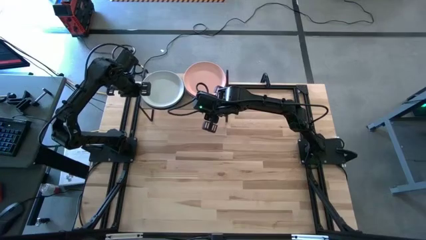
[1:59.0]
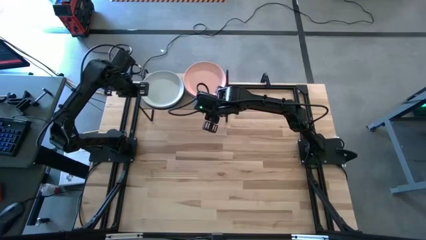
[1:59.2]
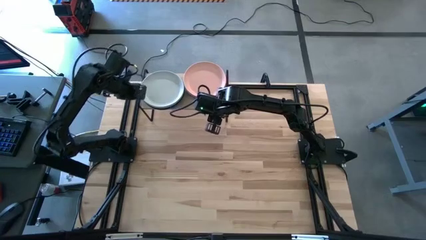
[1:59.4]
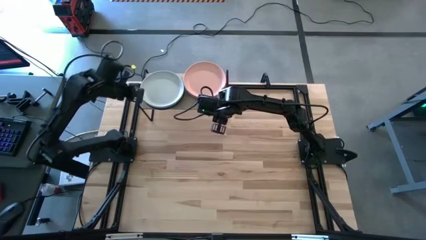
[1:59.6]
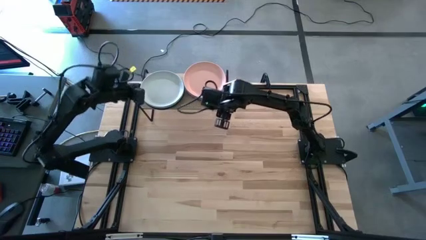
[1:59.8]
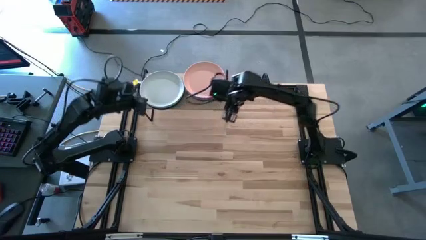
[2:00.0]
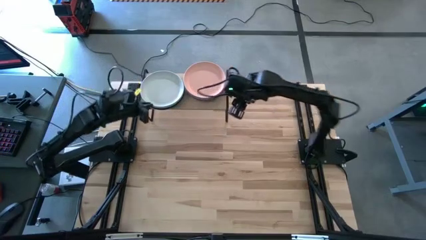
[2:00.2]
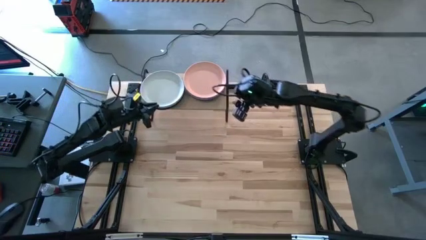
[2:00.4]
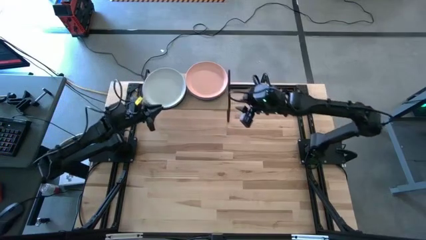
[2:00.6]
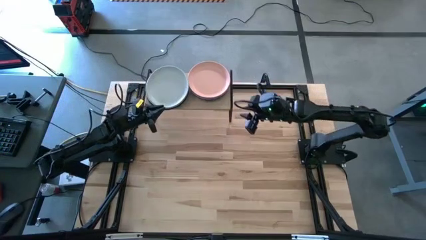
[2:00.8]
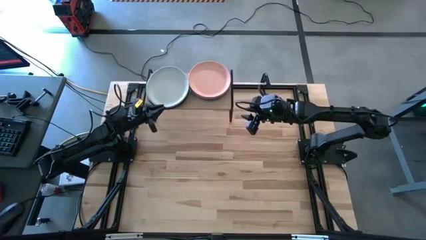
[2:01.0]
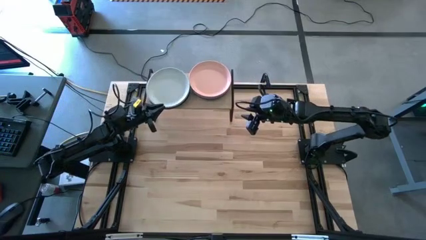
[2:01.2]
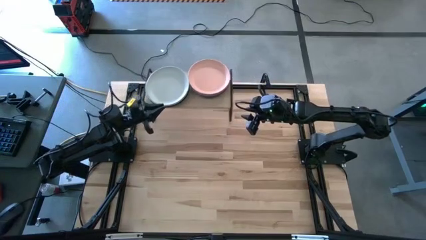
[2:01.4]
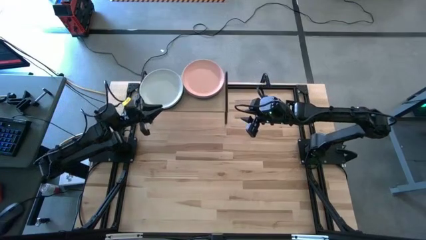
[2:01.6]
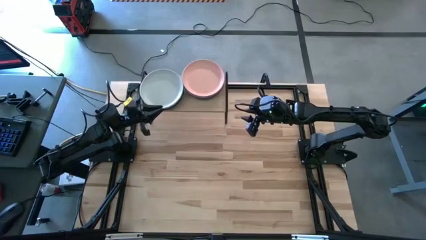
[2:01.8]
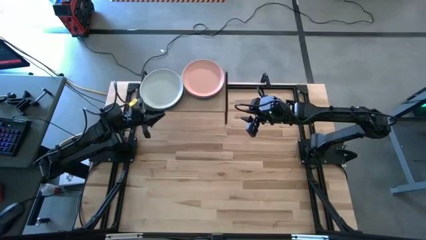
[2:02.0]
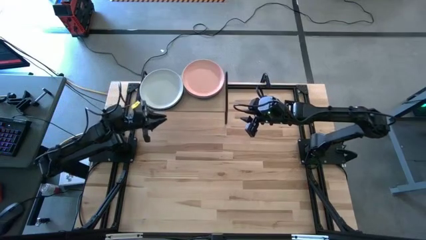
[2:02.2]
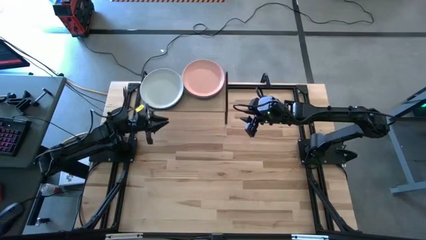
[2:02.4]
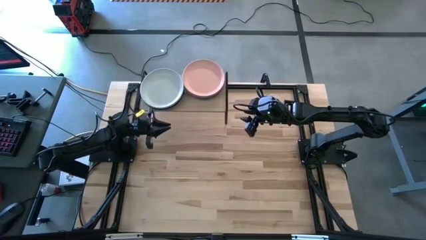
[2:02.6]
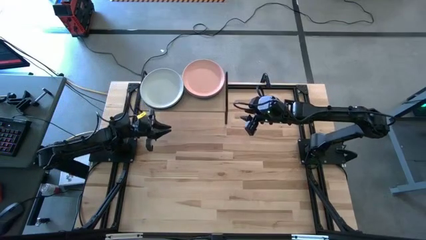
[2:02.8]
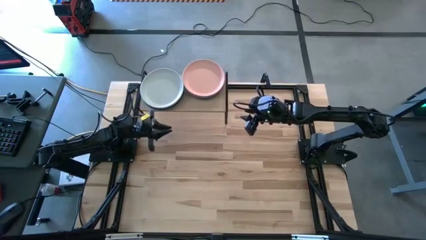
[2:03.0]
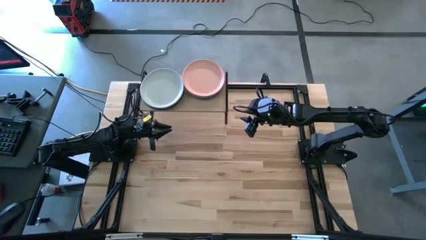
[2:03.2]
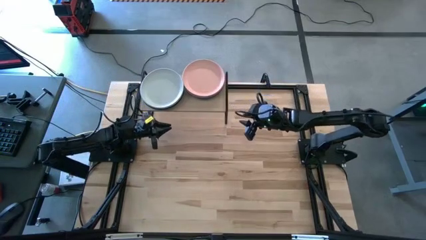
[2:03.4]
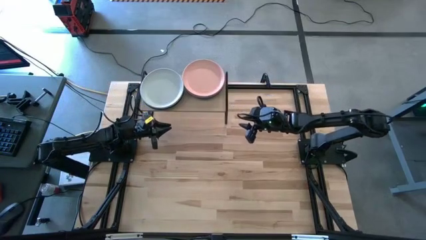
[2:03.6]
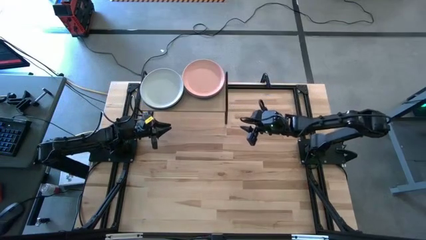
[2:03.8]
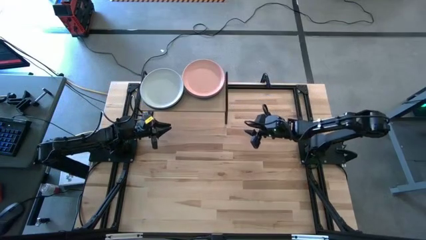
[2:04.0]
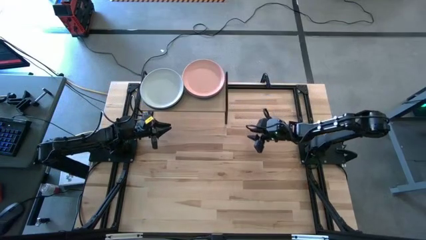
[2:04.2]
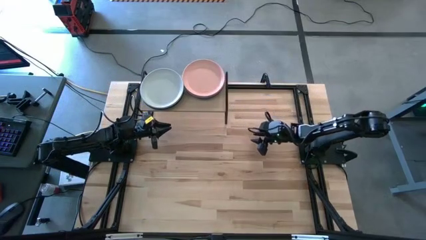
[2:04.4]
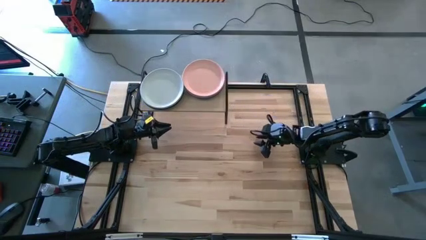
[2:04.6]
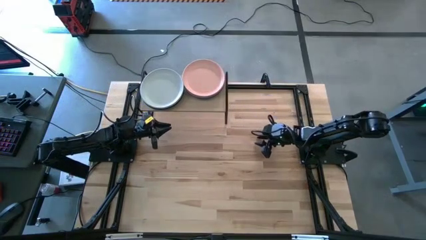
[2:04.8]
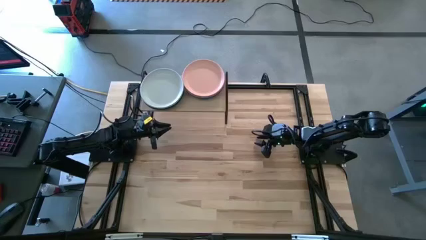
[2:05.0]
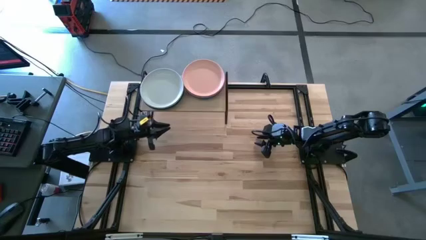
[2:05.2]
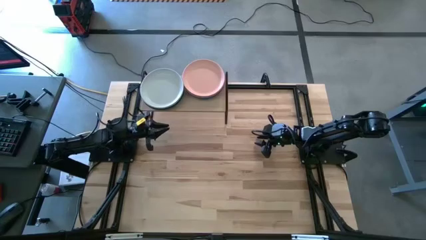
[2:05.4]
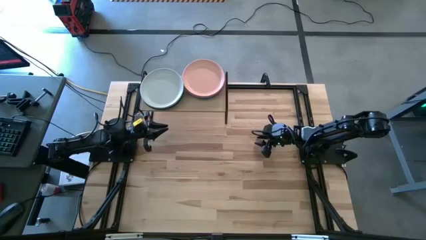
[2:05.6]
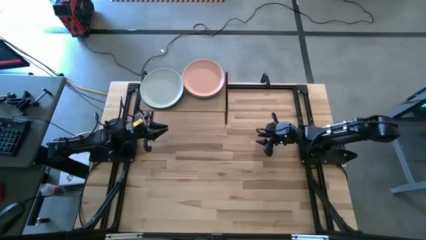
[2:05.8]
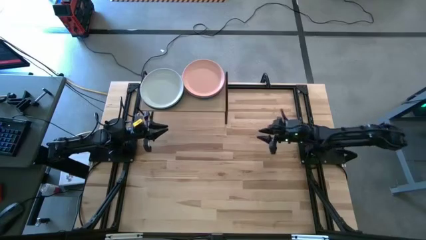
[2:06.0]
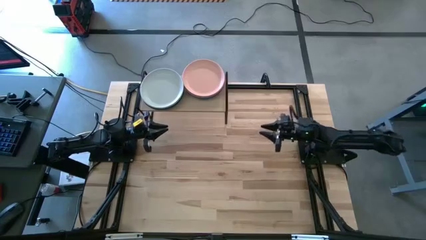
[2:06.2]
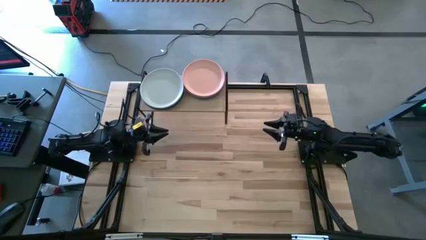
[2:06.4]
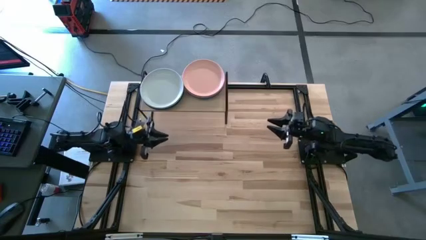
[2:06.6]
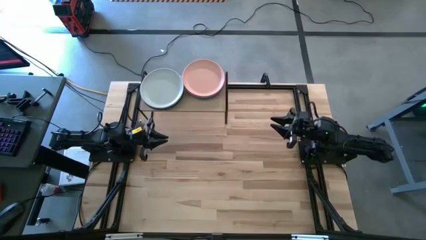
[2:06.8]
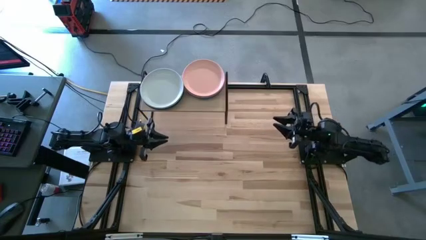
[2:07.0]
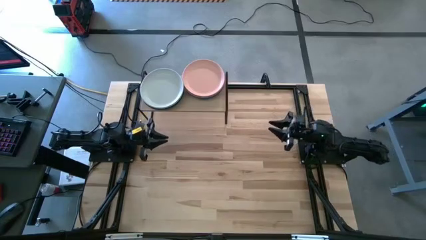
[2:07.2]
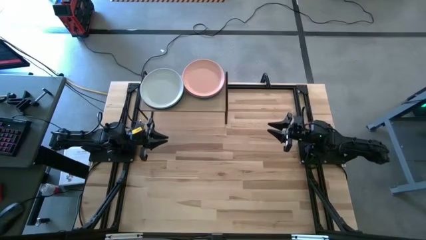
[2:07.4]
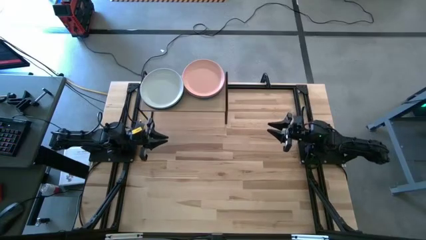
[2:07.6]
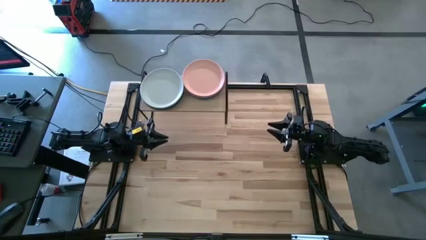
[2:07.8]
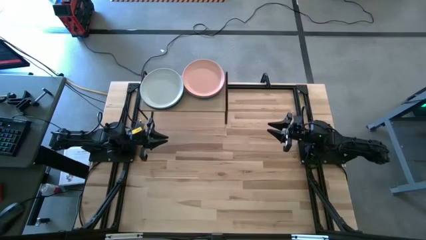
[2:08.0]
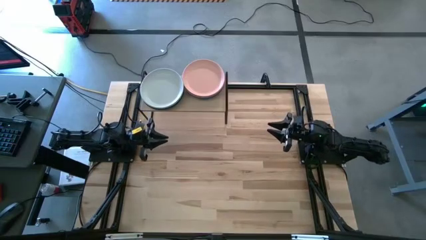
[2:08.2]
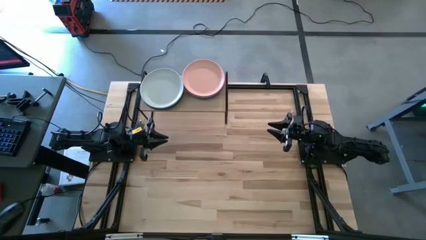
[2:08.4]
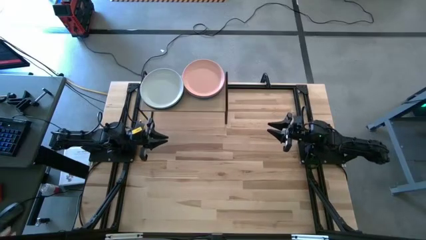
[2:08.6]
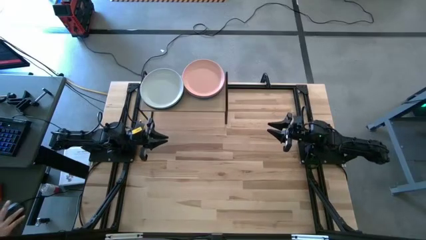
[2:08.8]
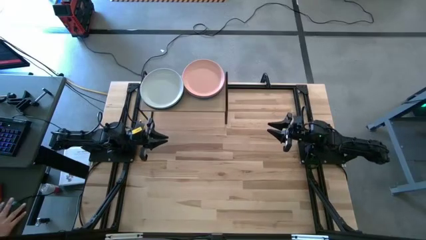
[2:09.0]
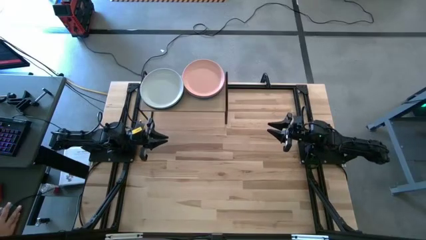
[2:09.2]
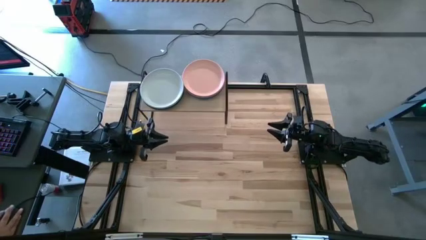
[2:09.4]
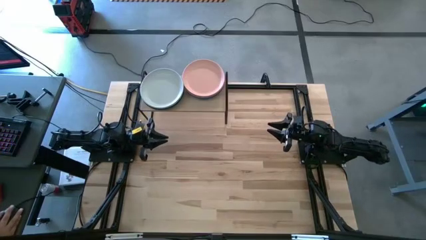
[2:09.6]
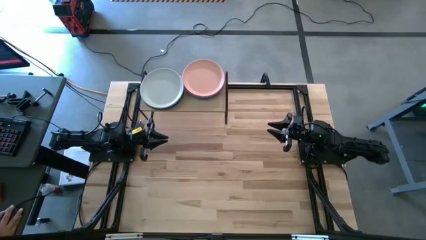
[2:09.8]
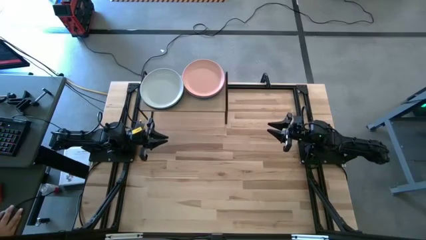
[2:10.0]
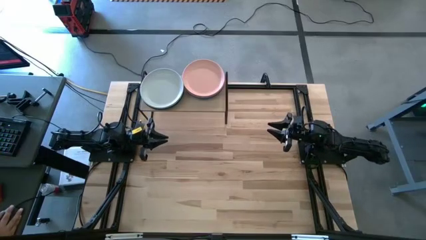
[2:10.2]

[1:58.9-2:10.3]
Task: Place and stack plates onto a shelf
Return to Home Position

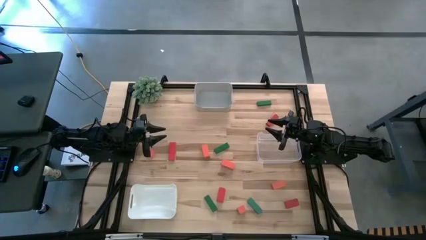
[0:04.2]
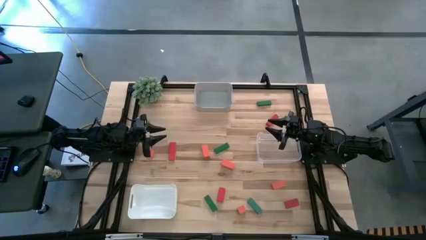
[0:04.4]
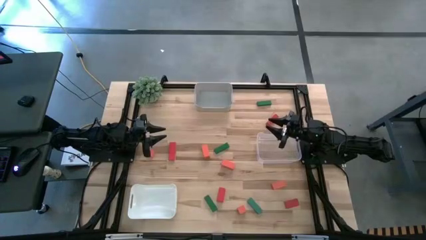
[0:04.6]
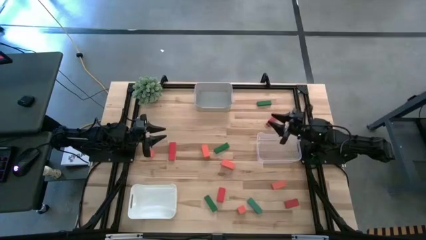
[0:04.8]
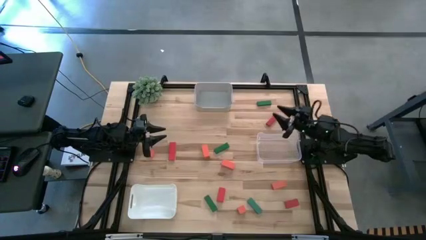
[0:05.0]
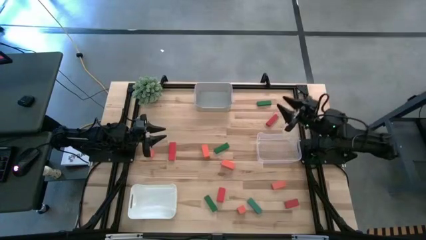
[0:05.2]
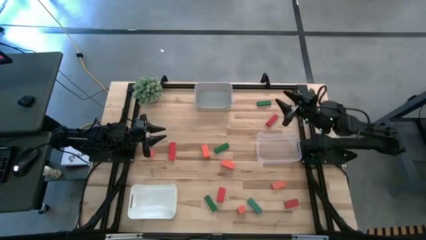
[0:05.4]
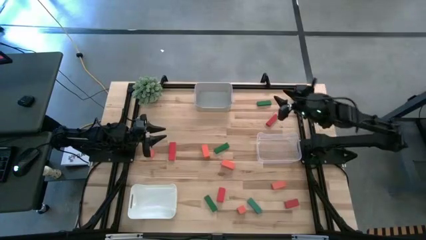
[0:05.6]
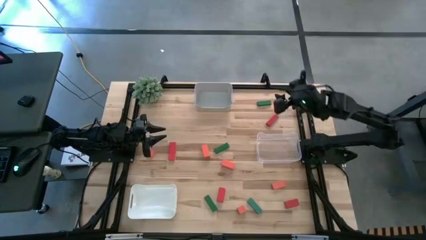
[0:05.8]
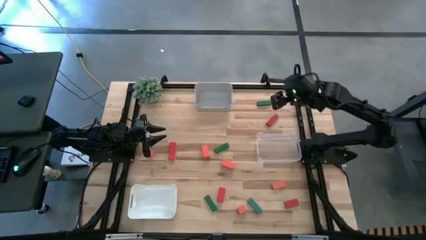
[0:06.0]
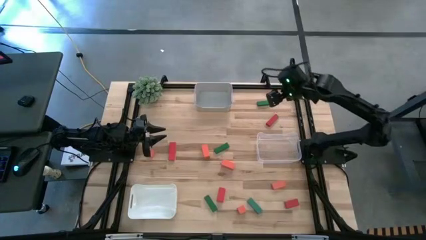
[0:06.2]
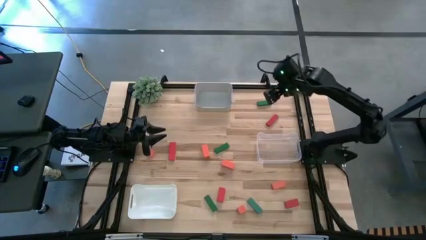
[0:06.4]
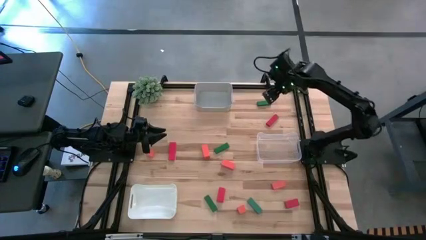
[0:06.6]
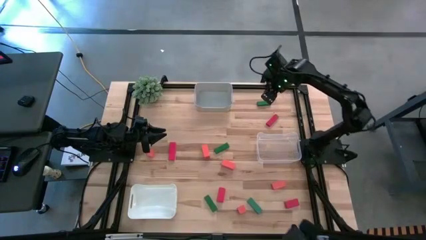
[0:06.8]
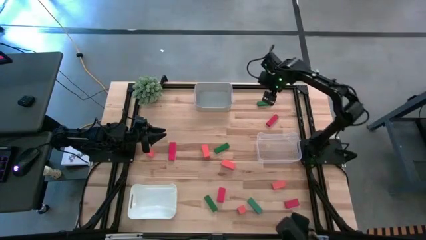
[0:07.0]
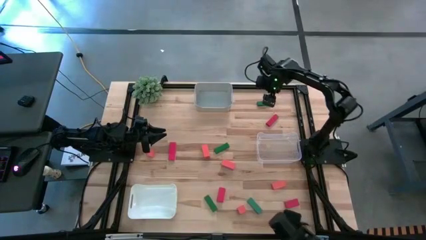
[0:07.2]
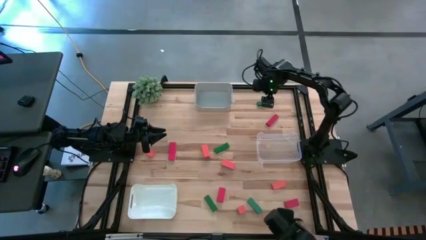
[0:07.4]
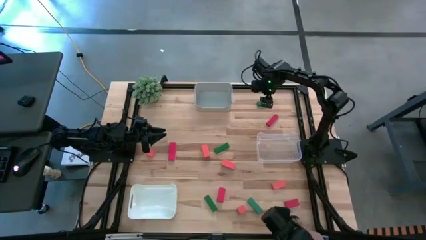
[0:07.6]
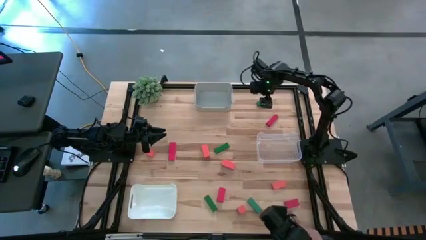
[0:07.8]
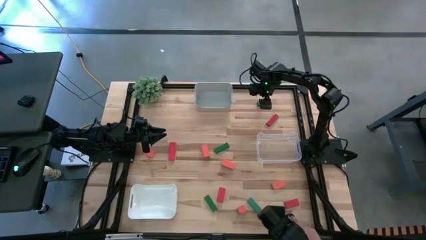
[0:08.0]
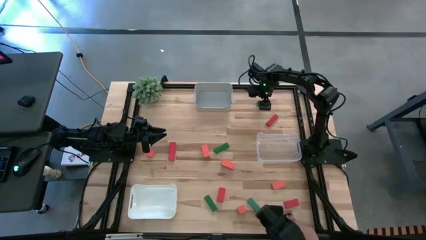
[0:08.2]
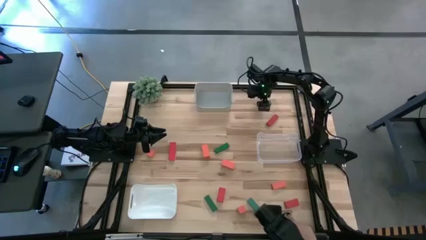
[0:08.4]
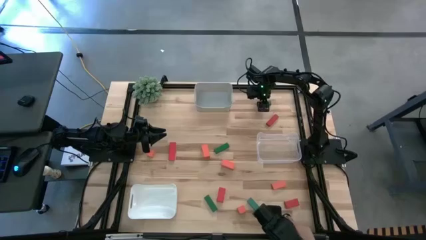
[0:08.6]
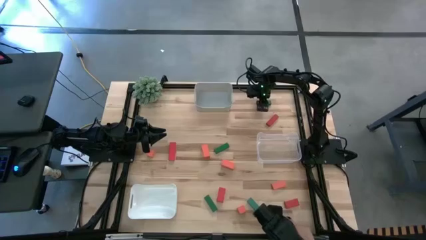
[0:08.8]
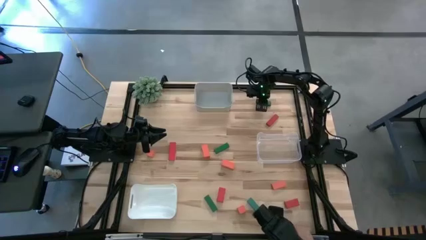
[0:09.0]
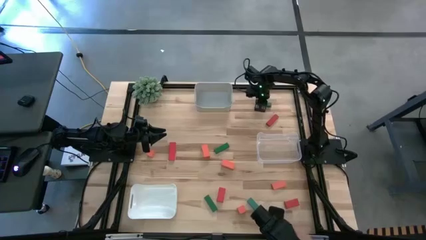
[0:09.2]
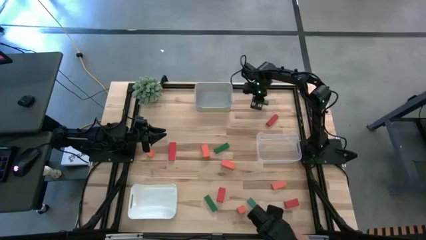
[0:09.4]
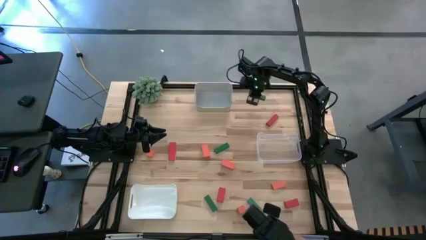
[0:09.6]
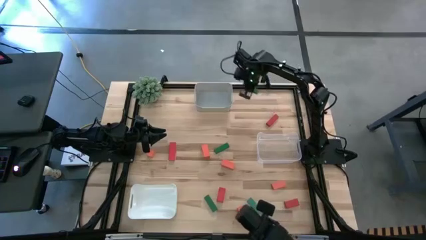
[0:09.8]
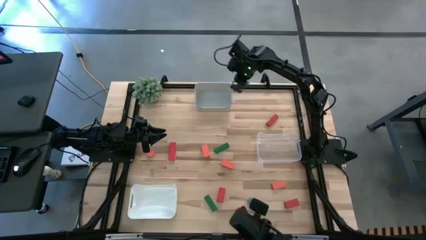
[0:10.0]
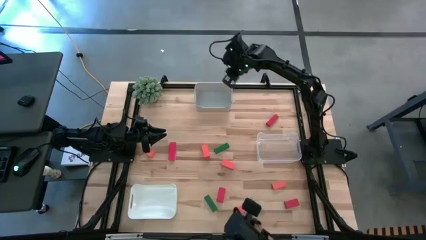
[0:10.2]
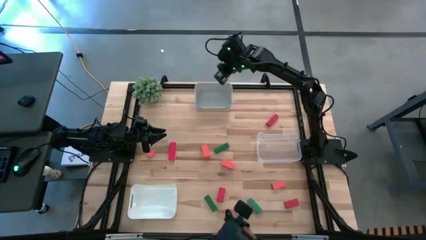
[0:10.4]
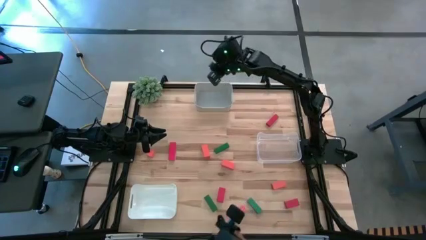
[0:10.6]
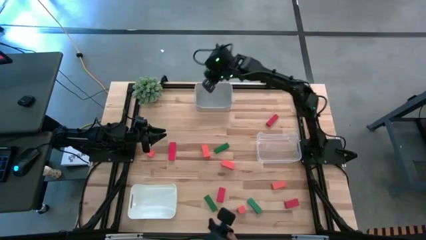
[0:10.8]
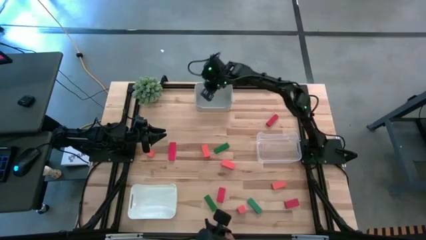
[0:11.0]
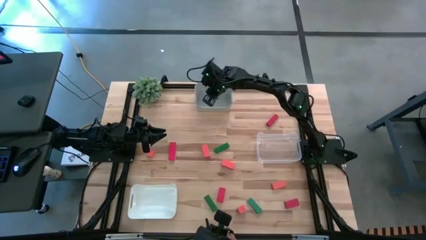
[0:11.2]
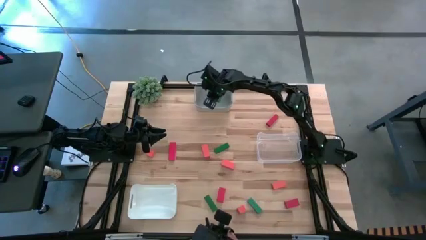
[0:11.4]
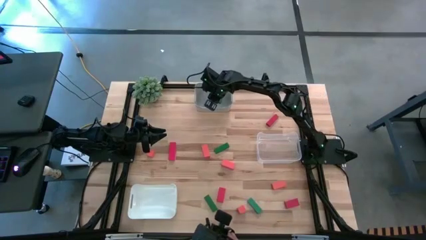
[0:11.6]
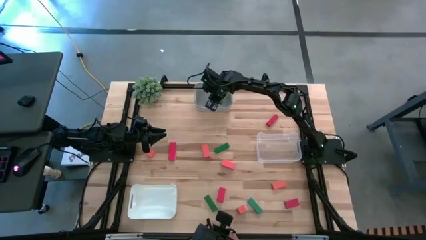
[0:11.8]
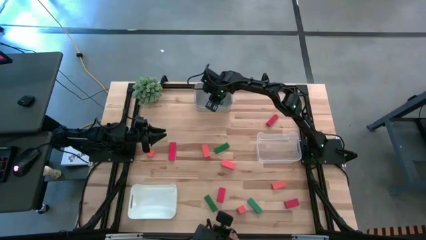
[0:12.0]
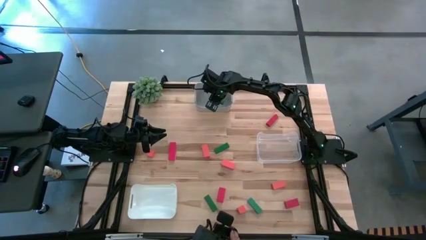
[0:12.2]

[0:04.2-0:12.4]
Task: Sort & place blocks by color
Put the green block into the gray bin
